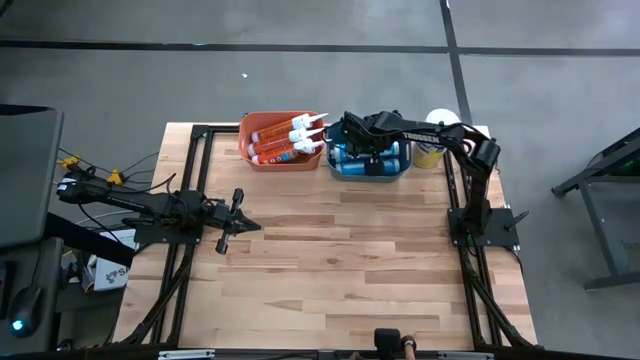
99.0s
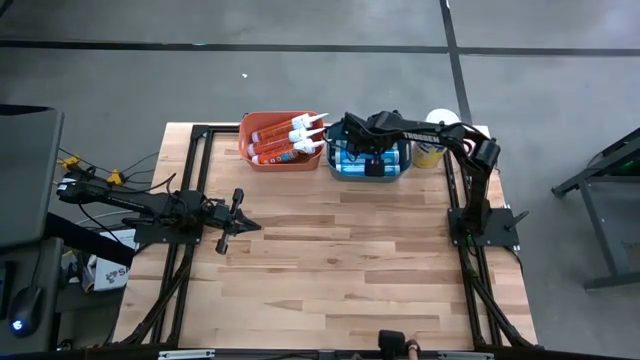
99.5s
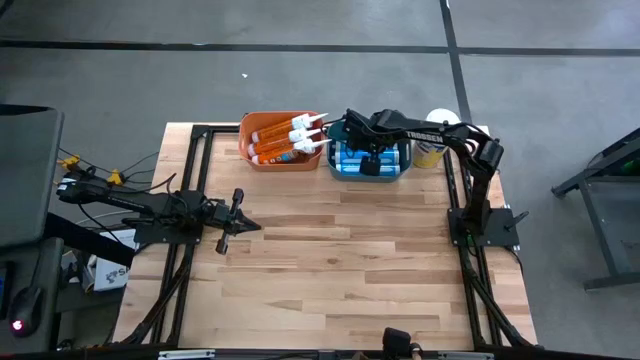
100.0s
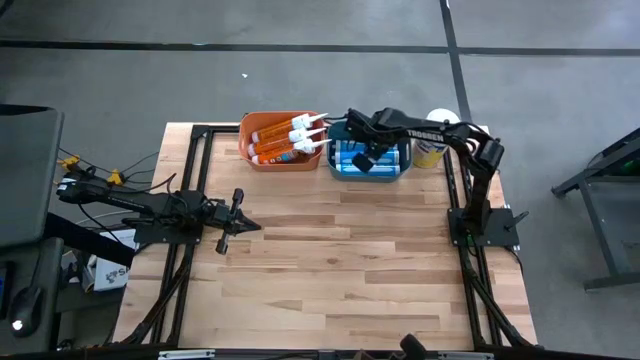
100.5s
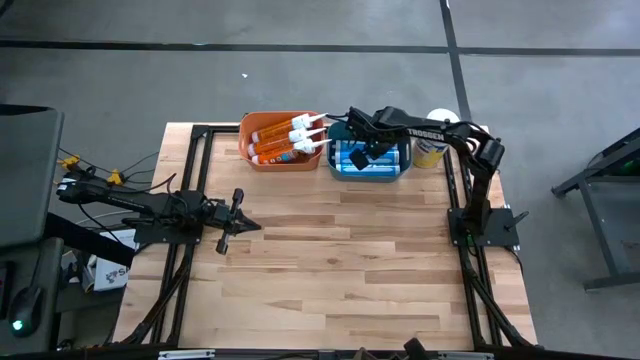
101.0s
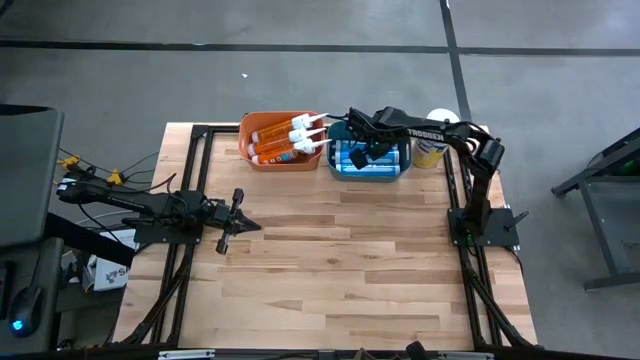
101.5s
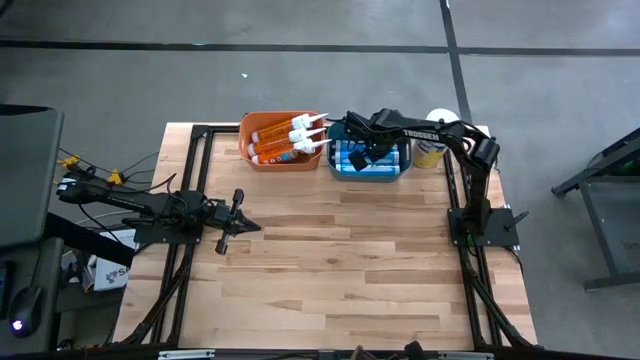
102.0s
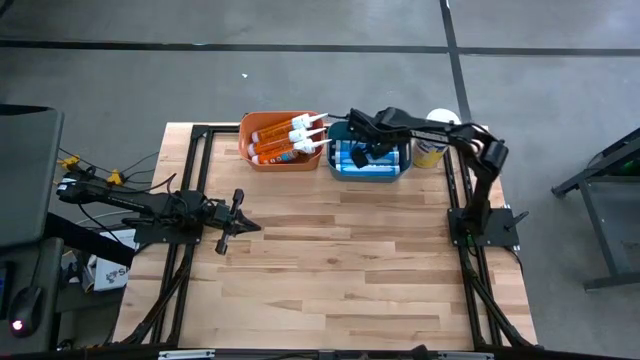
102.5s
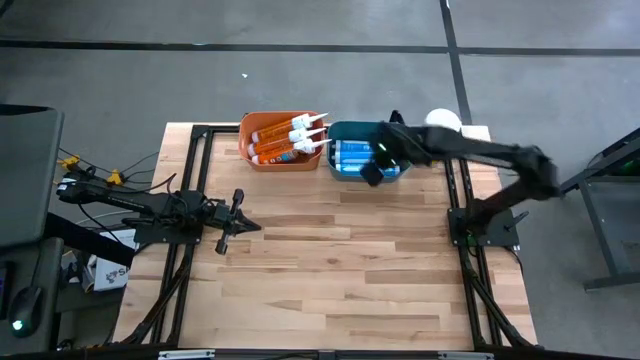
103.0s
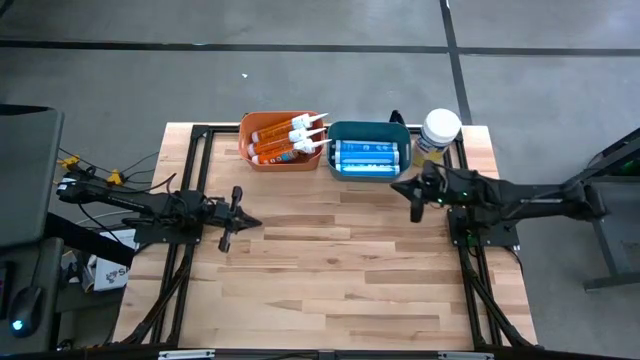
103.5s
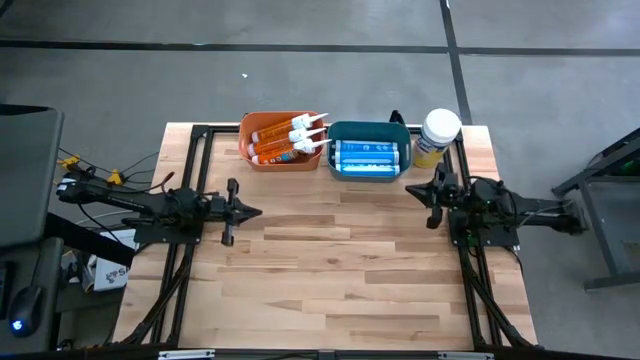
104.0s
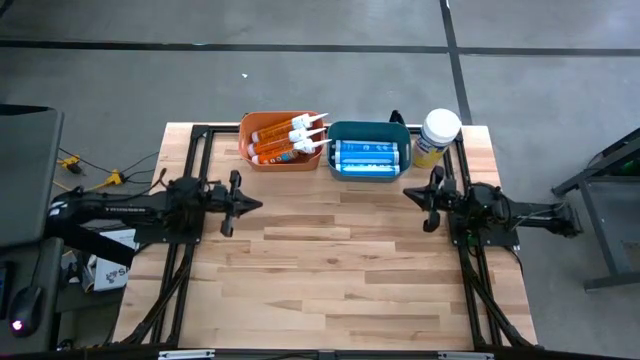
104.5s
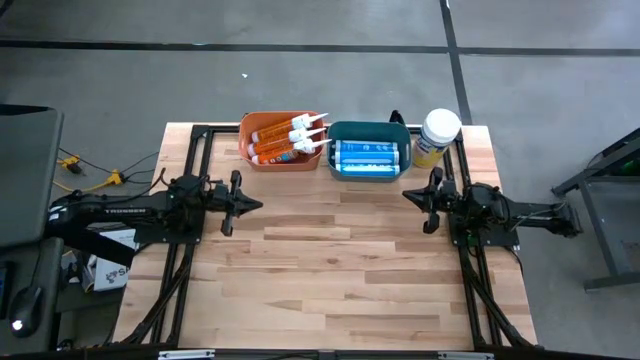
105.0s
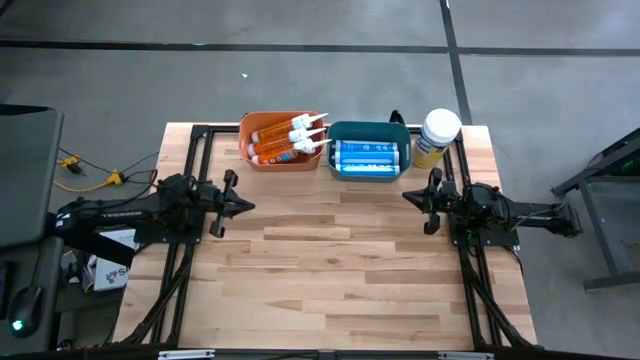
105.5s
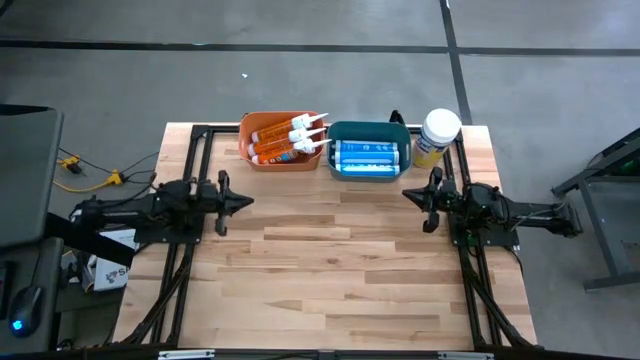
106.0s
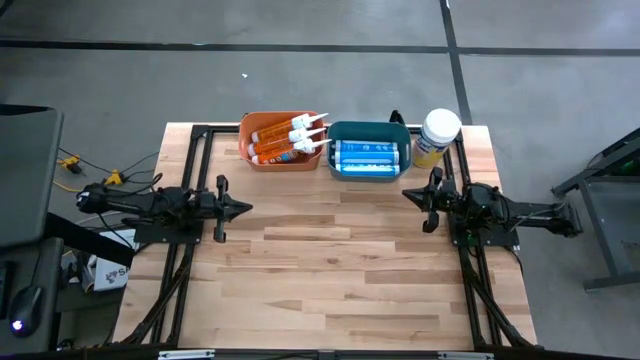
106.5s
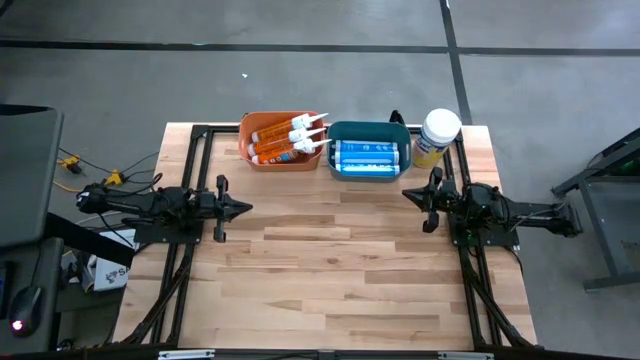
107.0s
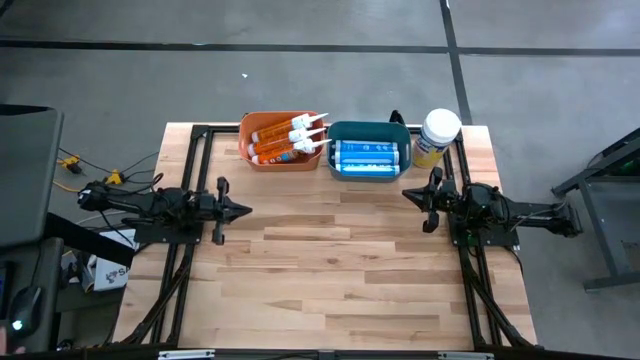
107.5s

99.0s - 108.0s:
Task: Pick & place silicon tubes, Sealant and Lysol wipes
Return to Home Position

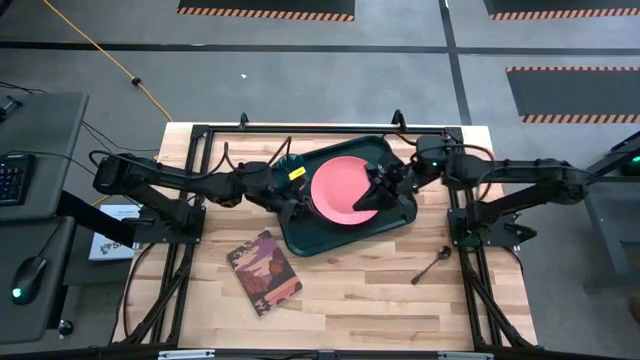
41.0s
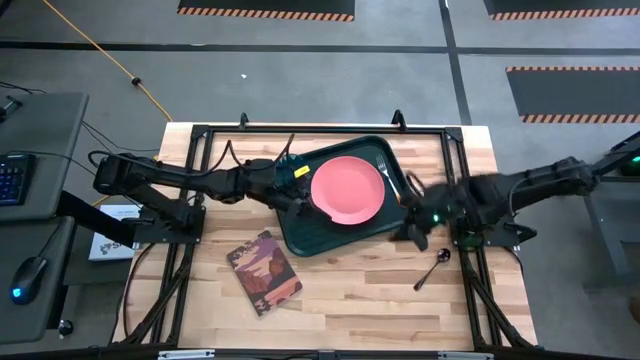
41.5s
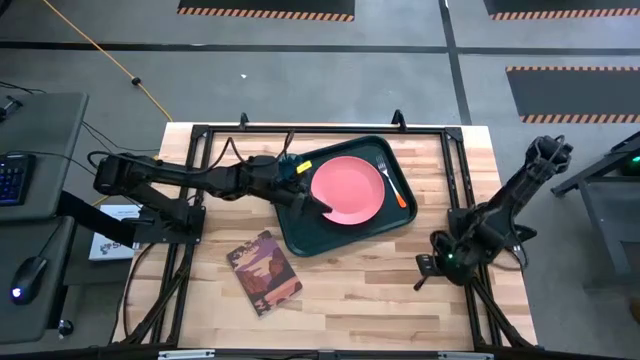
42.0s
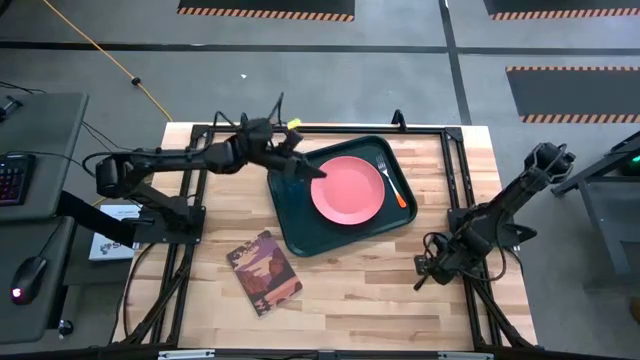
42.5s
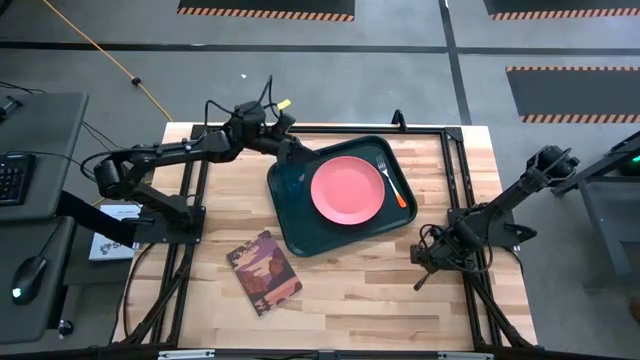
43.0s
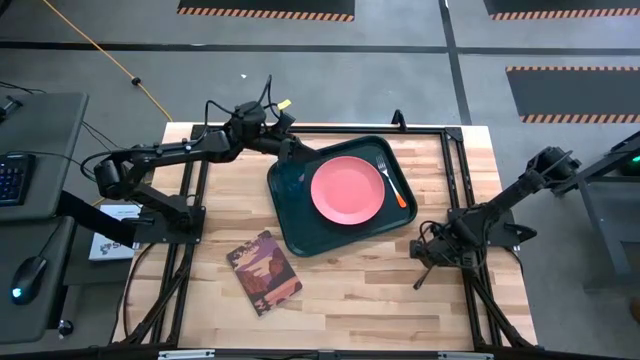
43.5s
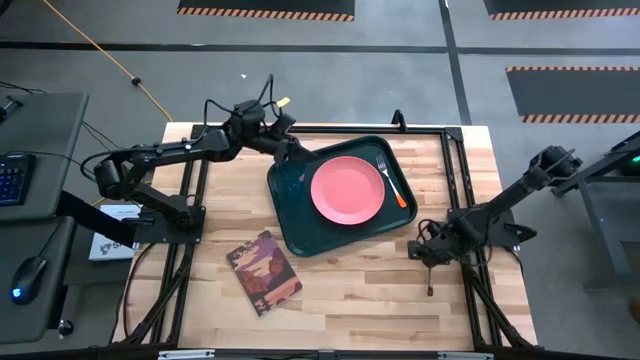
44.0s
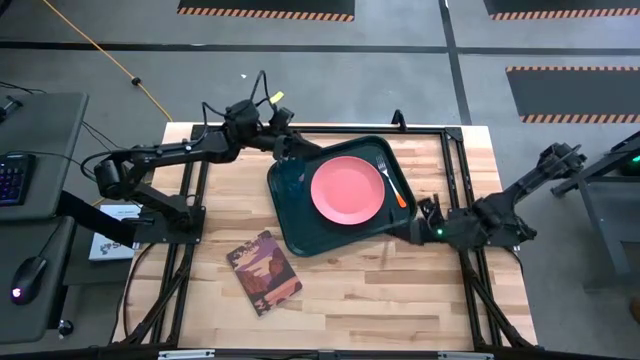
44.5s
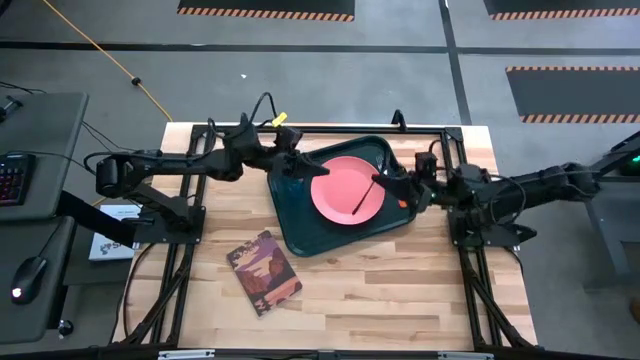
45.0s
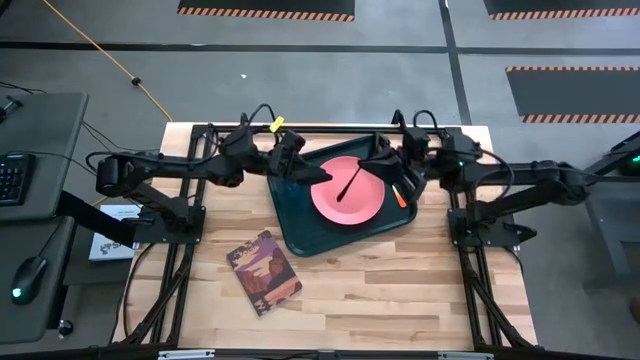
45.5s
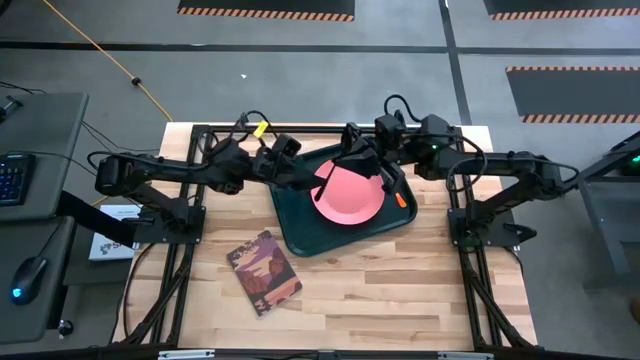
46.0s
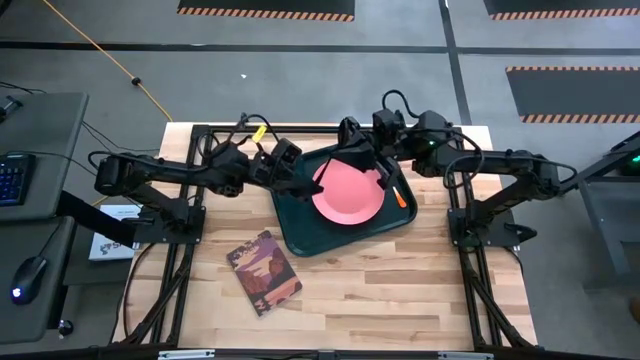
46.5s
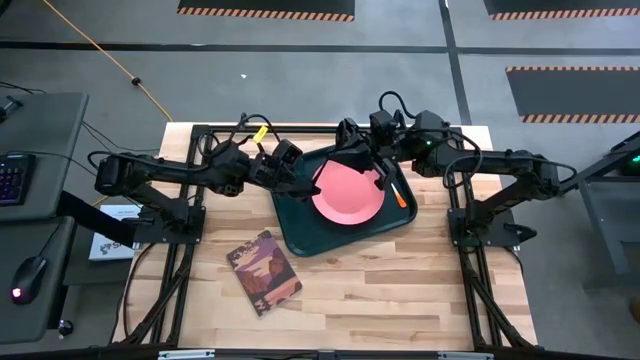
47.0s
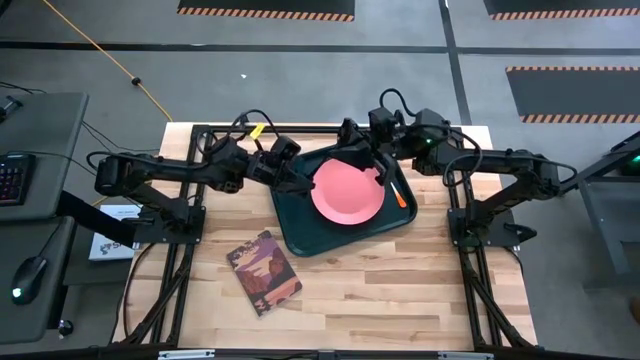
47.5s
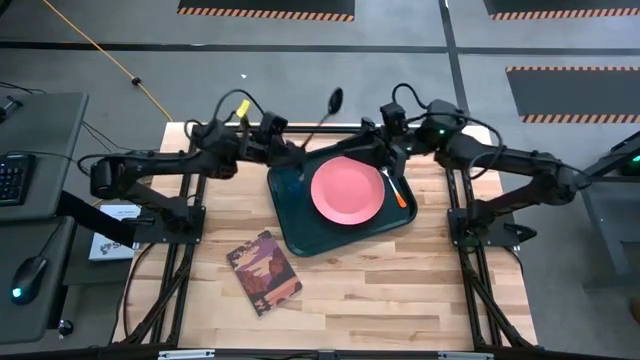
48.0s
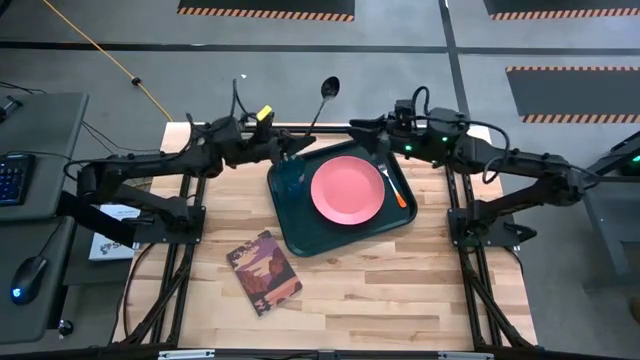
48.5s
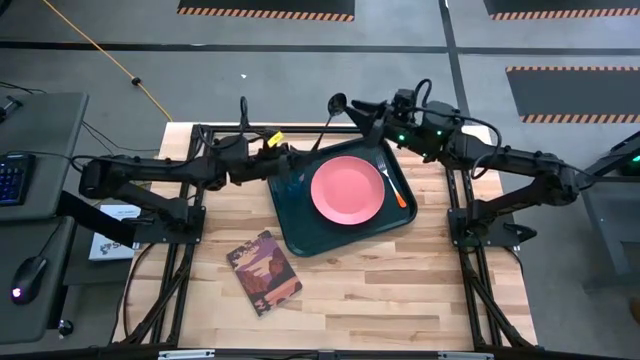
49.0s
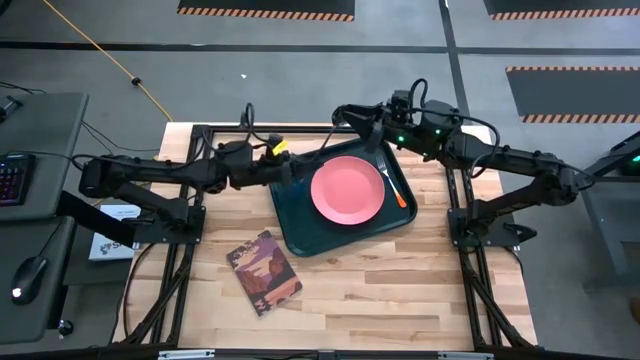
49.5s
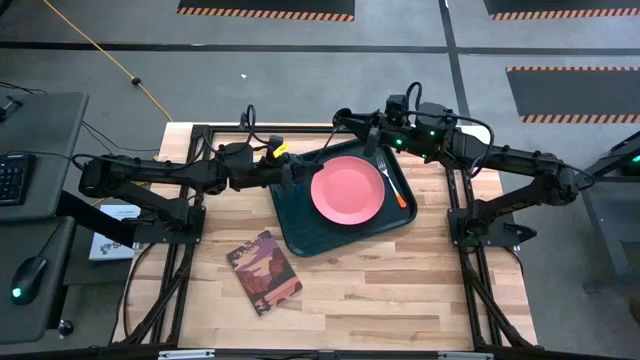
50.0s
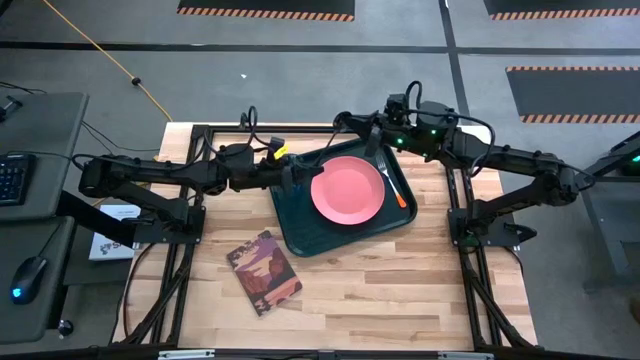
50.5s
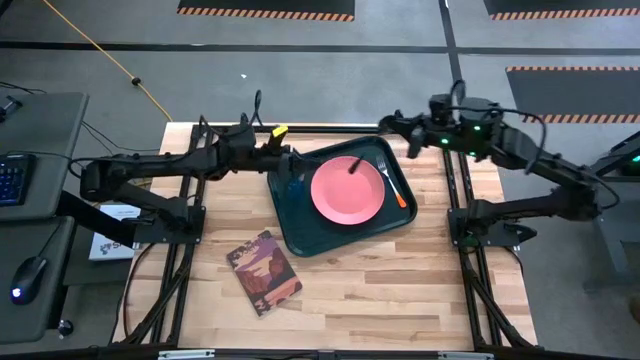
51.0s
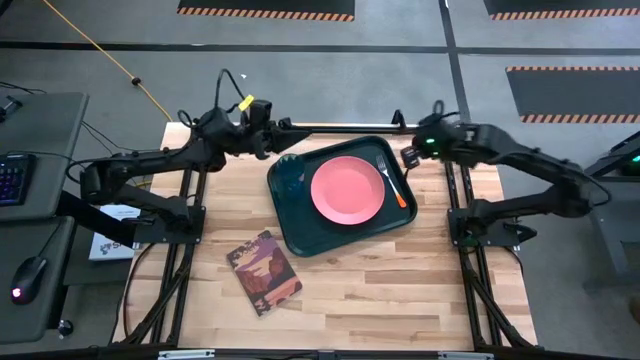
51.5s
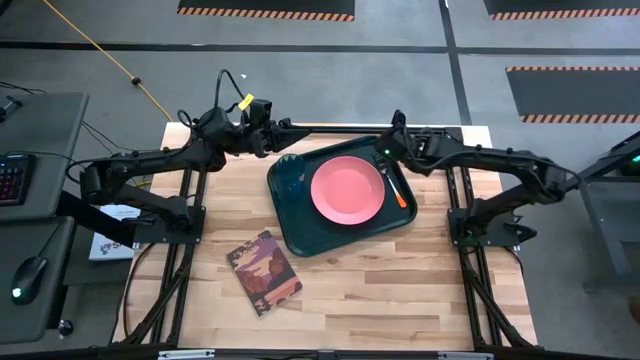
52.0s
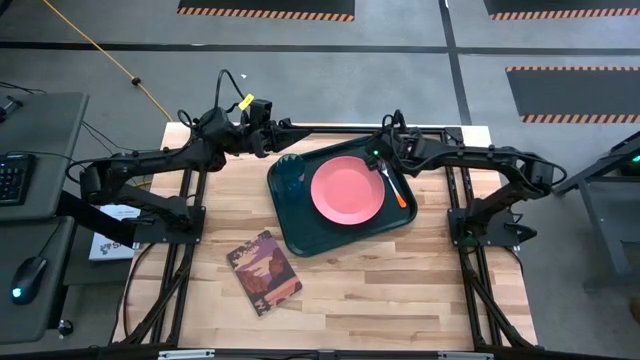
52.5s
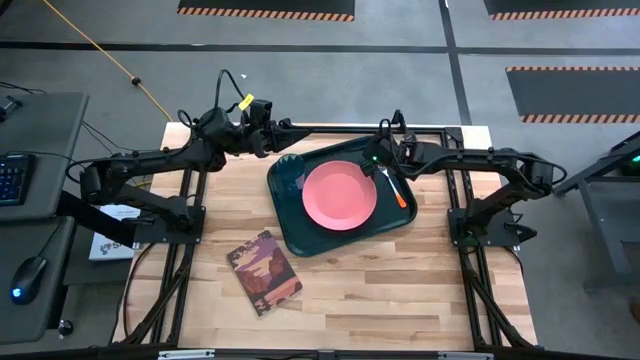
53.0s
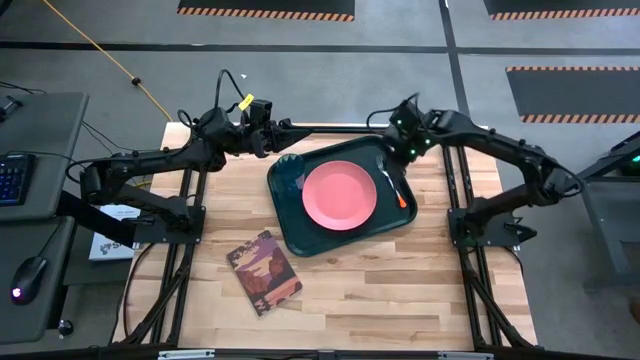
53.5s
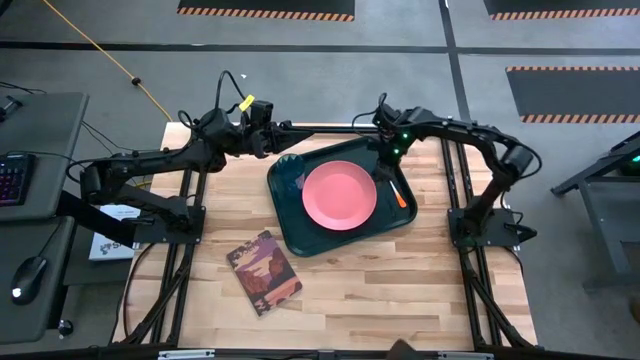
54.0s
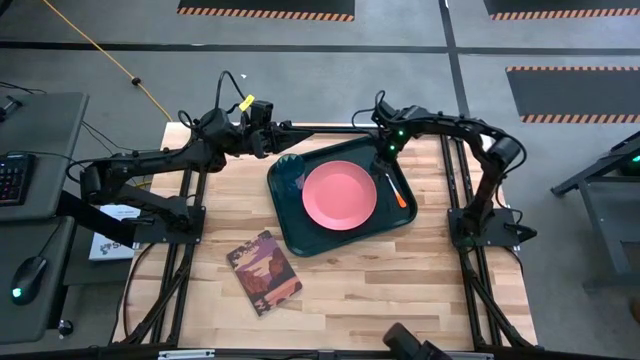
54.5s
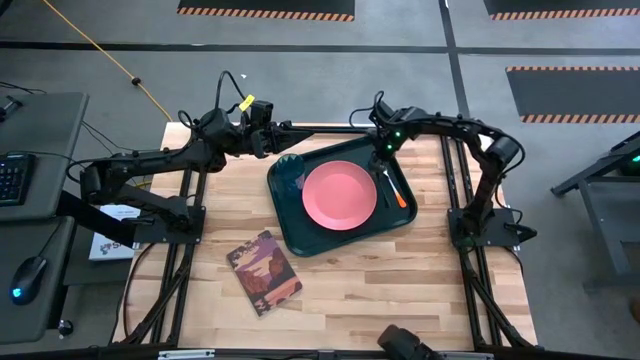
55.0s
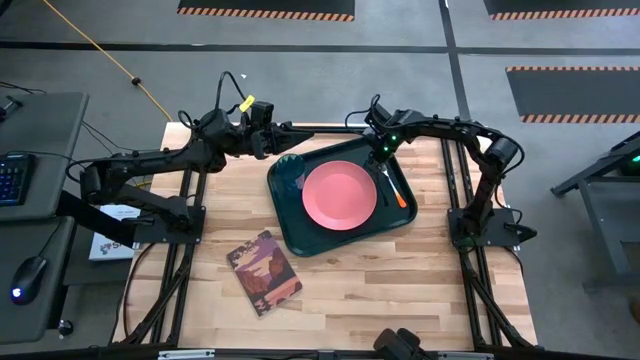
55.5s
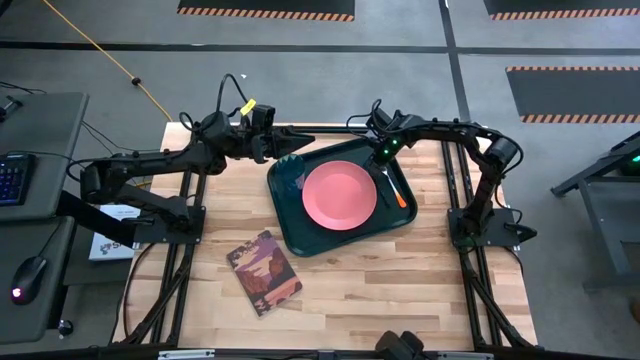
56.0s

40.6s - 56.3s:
Task: Pick and place plate/cup/fork/spoon on tray
Put the black spoon to the right of the pink plate on the black tray
